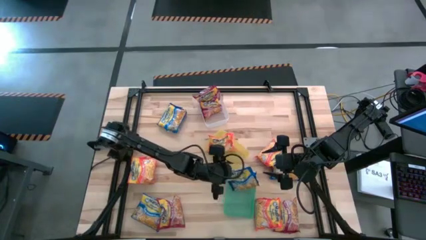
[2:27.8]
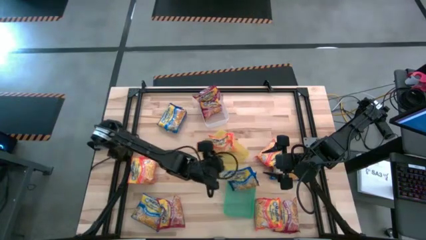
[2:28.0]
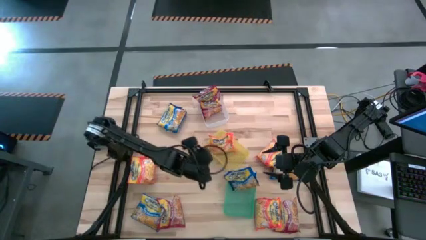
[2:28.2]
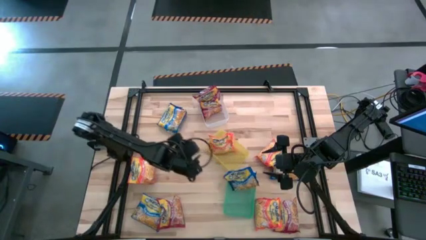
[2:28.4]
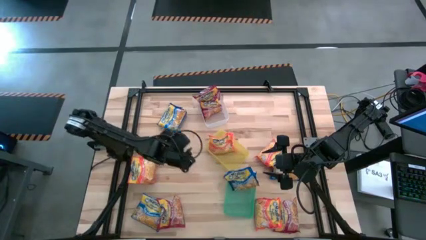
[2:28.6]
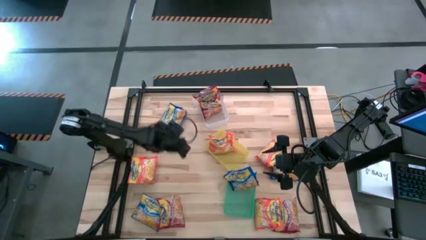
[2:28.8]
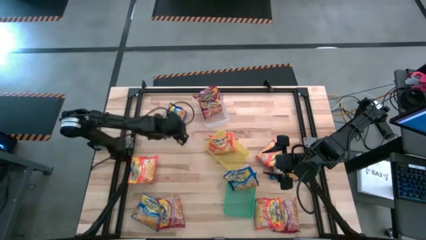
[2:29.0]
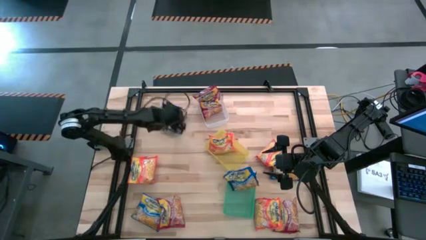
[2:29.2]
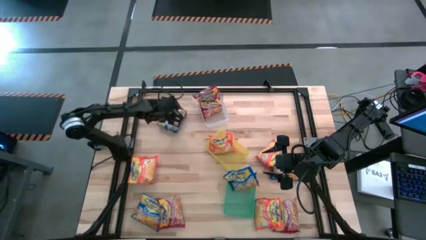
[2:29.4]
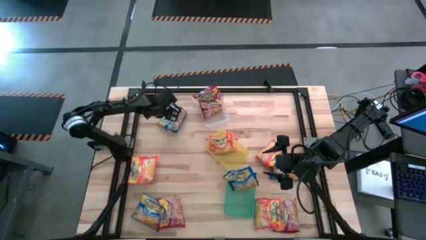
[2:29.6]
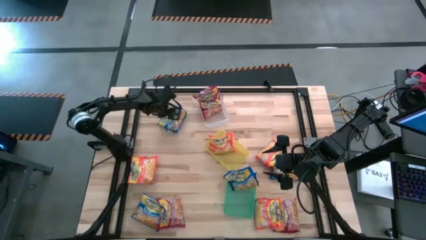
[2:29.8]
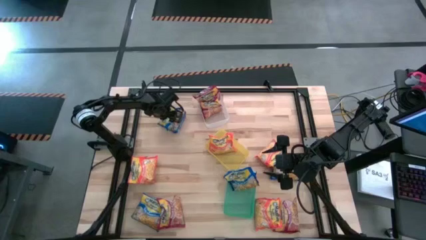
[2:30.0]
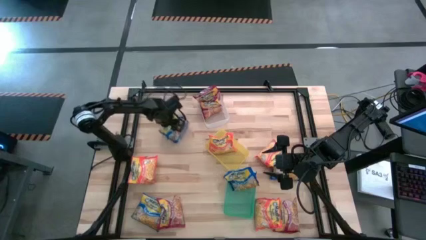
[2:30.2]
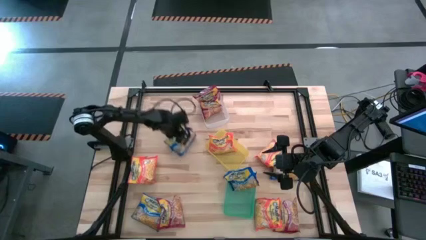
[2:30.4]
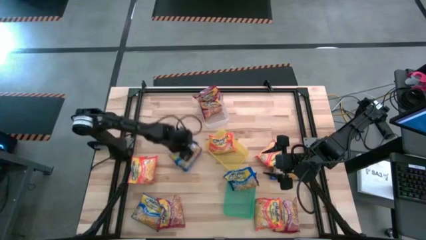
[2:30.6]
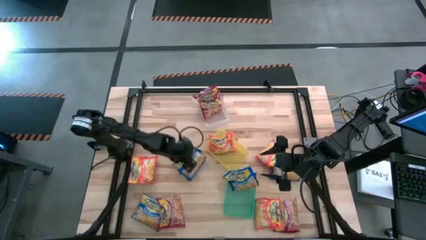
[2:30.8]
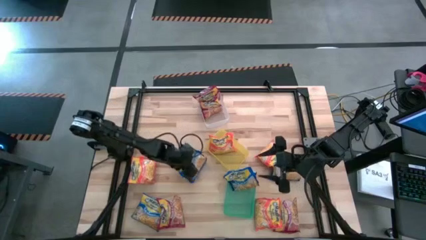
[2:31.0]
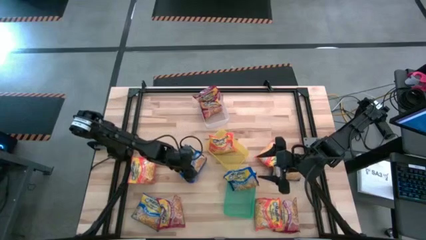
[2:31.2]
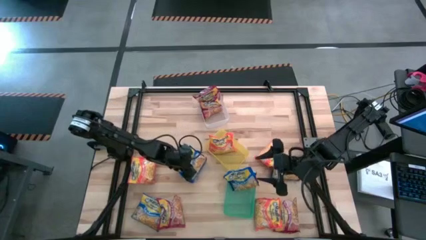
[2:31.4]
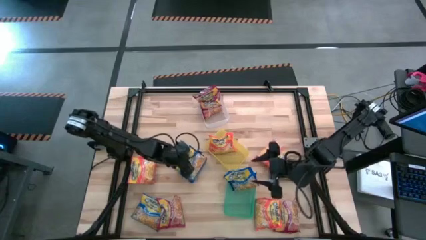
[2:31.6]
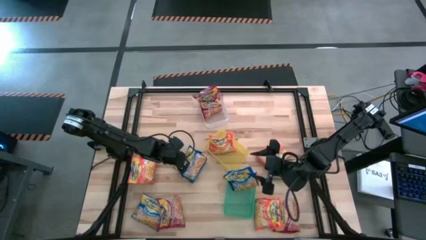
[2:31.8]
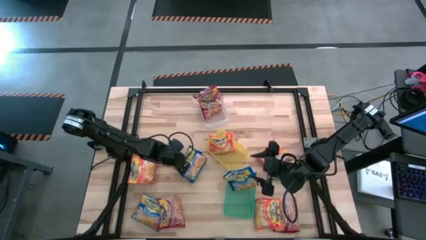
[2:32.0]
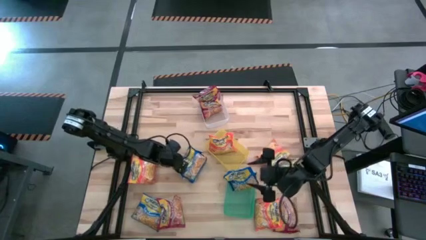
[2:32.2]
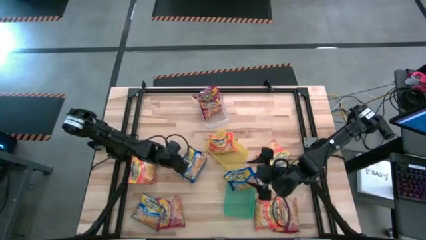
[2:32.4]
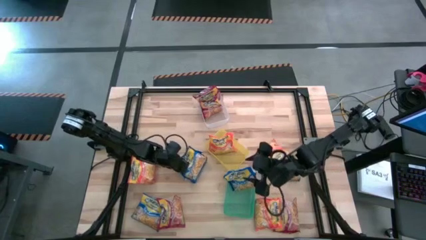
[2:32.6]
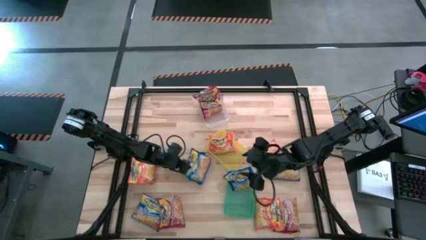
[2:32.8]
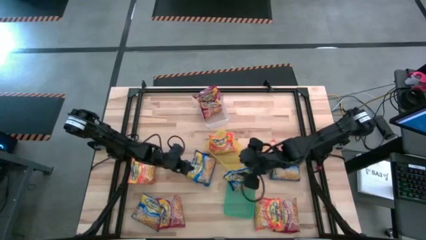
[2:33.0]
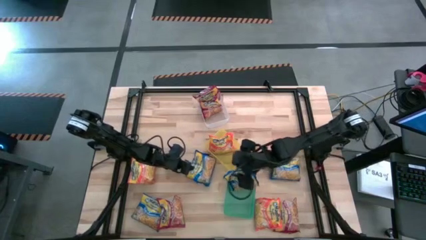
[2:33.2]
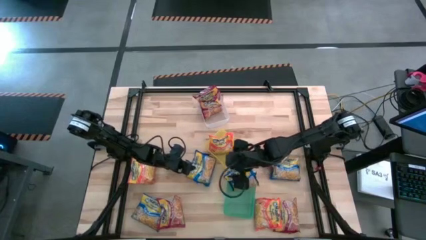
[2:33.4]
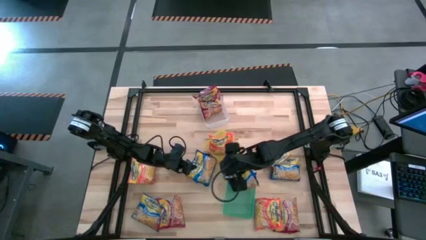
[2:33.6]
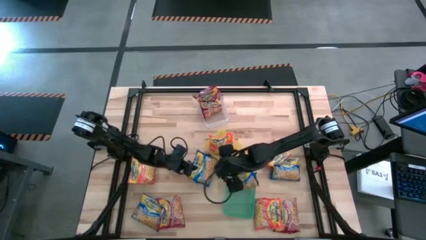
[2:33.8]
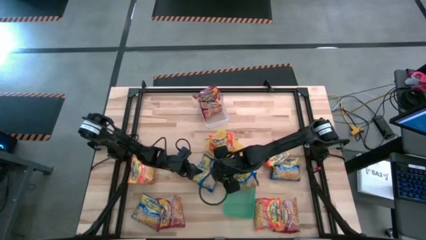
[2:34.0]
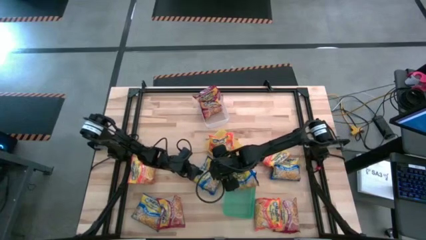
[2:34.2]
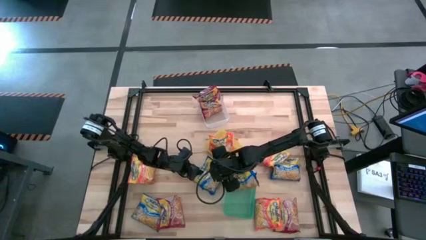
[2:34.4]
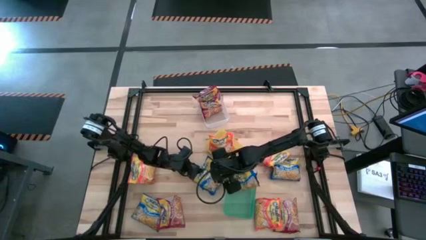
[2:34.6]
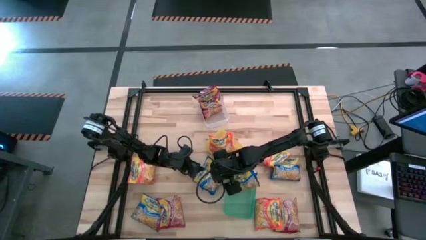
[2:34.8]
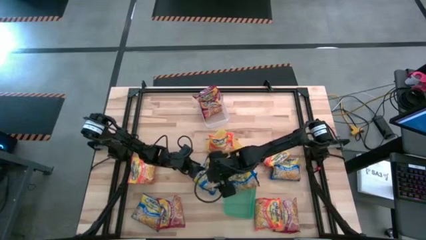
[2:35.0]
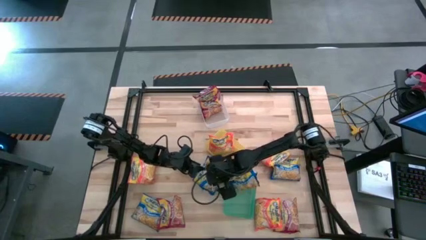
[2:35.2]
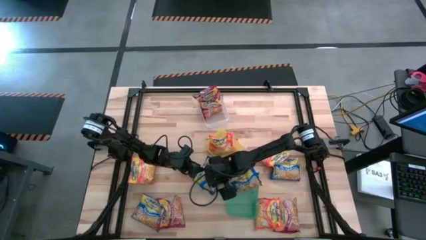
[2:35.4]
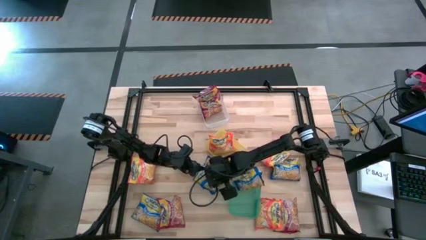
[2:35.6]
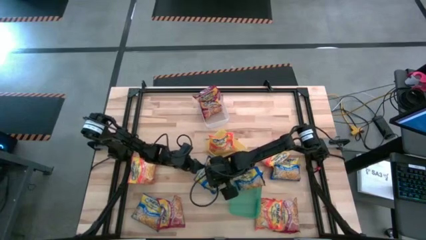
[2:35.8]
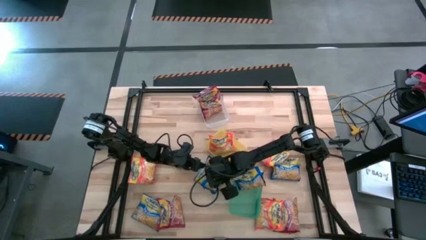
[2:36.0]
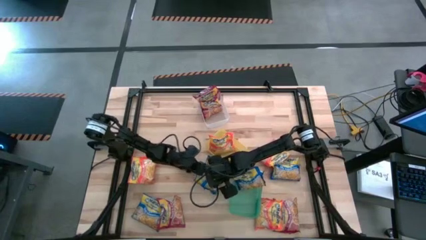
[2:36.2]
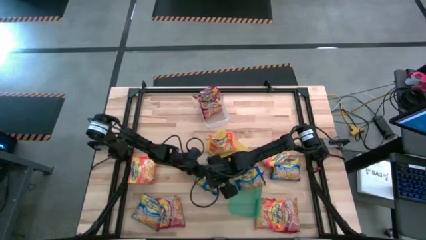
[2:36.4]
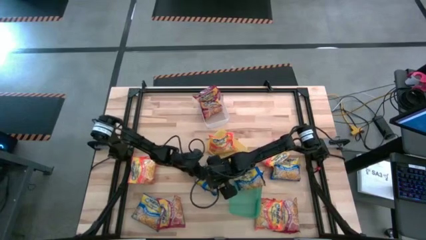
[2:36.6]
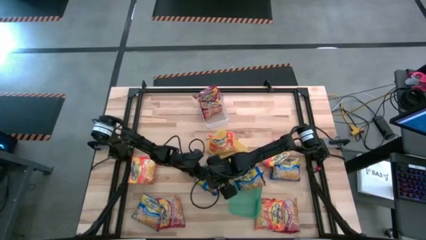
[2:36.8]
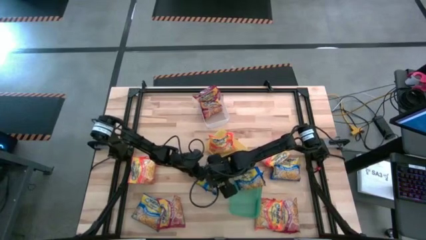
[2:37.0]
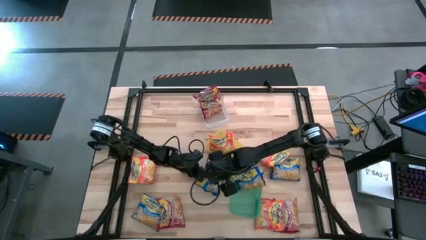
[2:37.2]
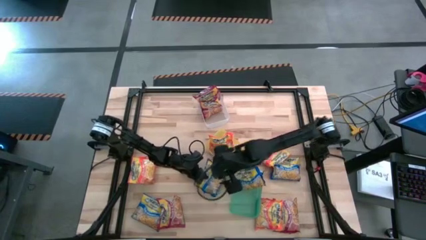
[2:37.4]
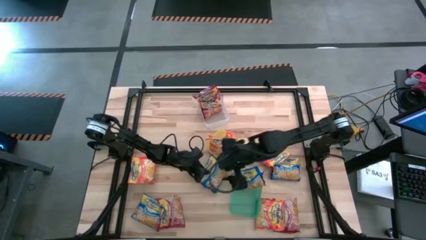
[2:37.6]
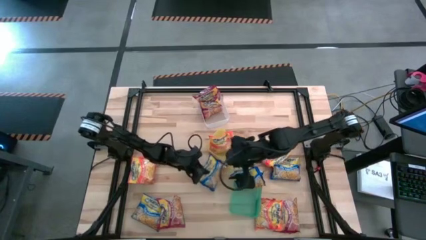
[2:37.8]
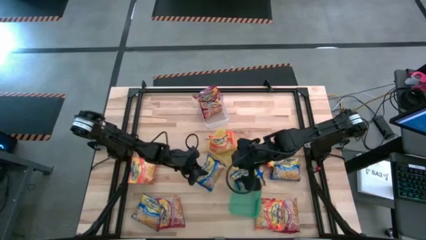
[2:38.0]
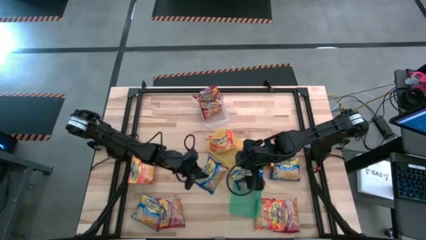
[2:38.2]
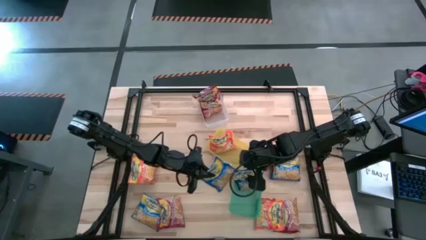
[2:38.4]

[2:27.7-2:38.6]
Task: Sort Maruchan noodles
Put the blue noodle pack into the green bin

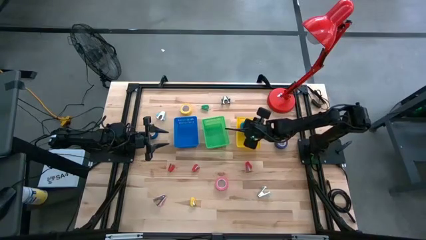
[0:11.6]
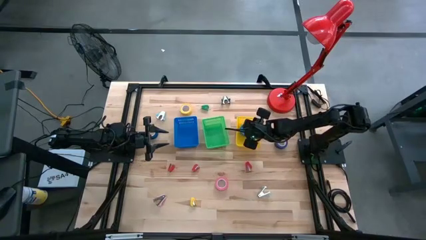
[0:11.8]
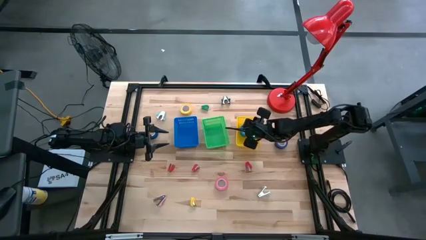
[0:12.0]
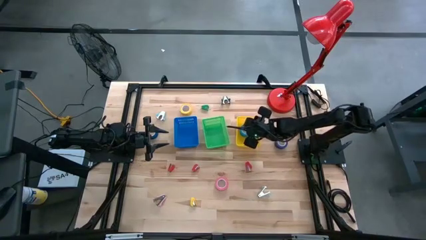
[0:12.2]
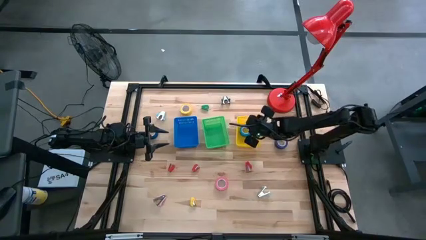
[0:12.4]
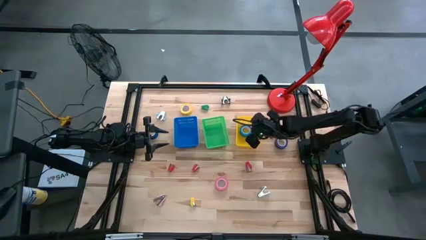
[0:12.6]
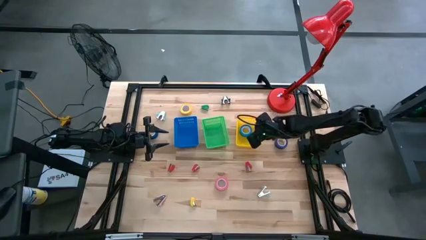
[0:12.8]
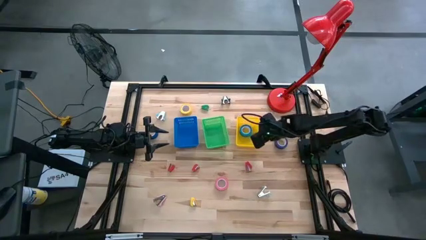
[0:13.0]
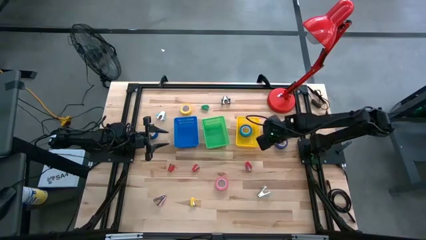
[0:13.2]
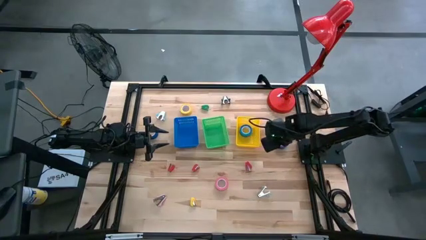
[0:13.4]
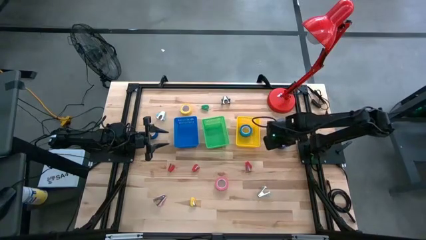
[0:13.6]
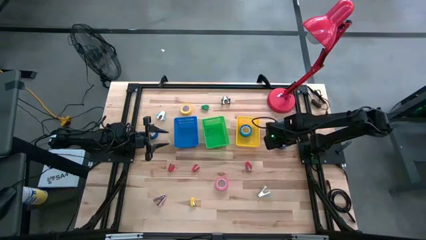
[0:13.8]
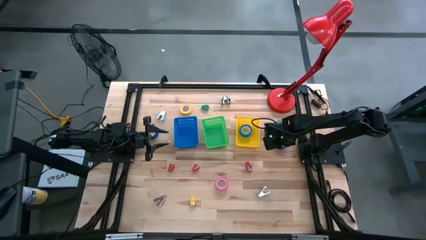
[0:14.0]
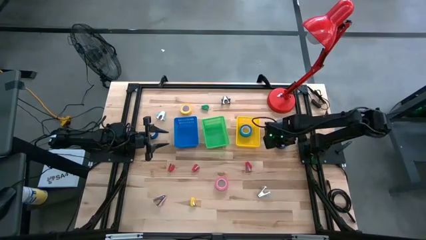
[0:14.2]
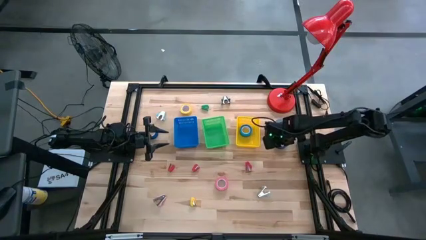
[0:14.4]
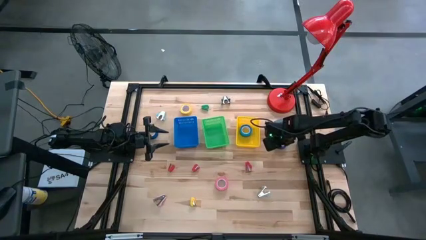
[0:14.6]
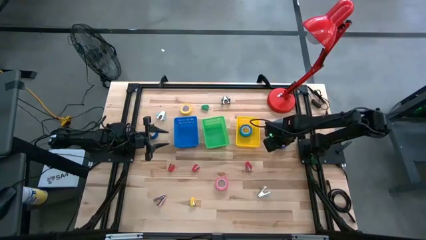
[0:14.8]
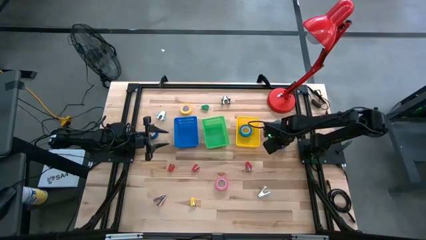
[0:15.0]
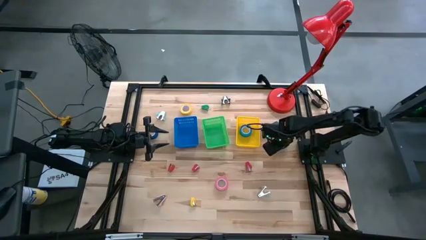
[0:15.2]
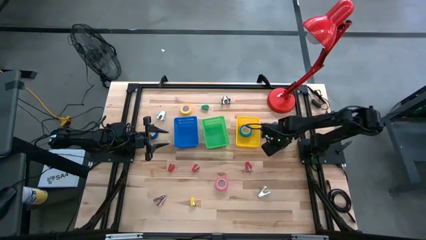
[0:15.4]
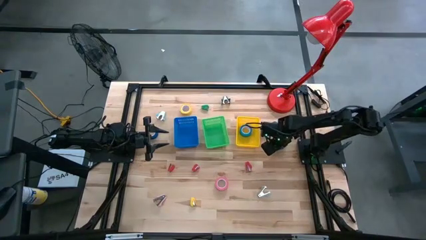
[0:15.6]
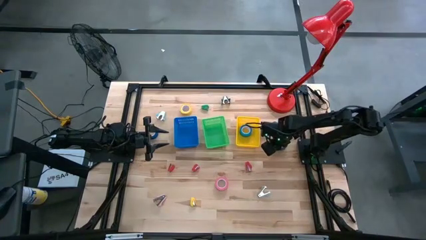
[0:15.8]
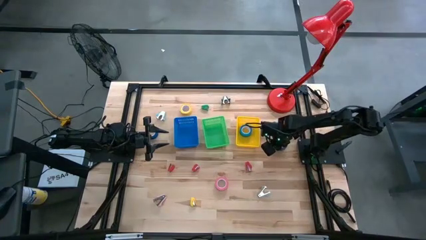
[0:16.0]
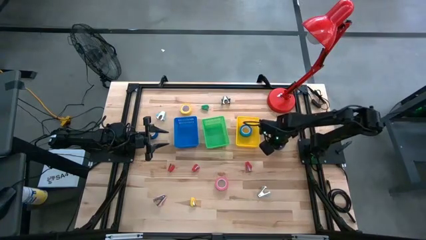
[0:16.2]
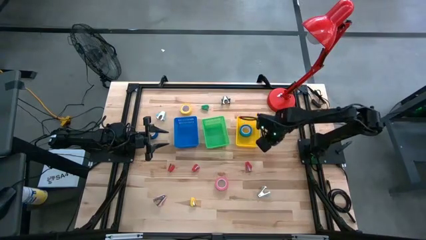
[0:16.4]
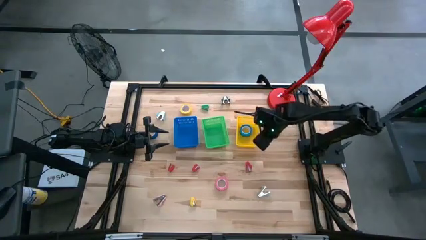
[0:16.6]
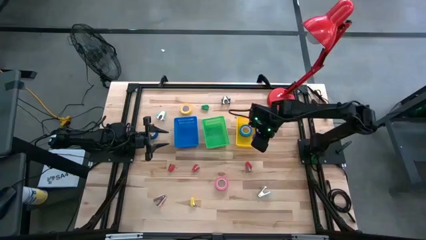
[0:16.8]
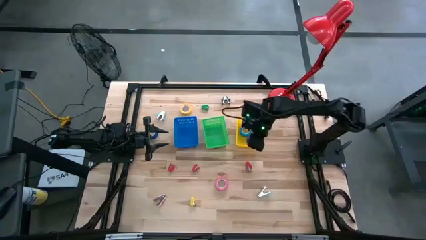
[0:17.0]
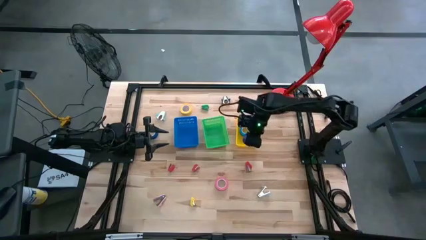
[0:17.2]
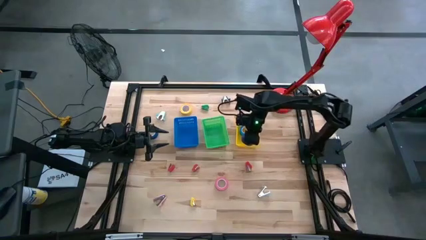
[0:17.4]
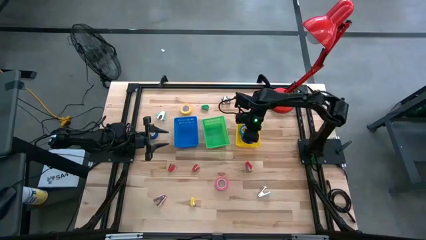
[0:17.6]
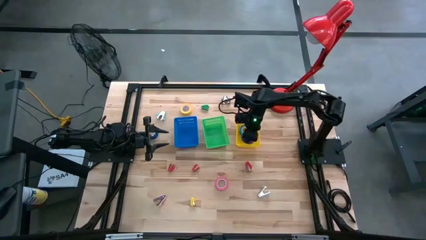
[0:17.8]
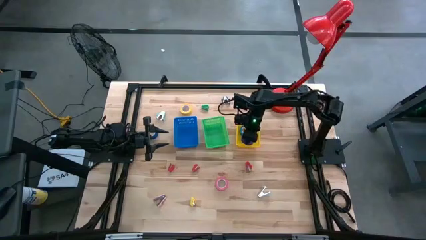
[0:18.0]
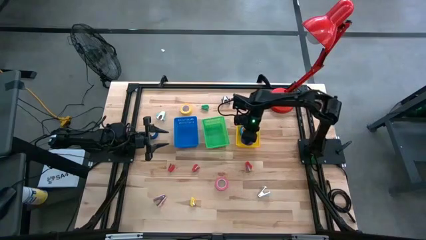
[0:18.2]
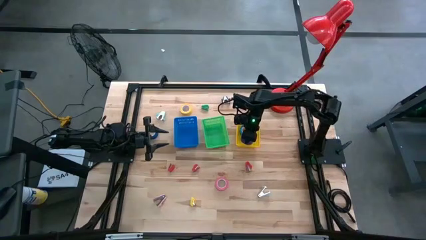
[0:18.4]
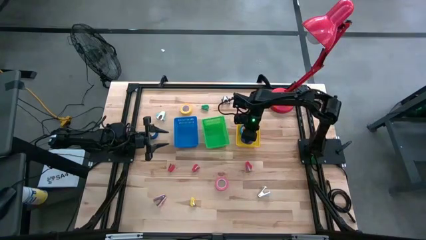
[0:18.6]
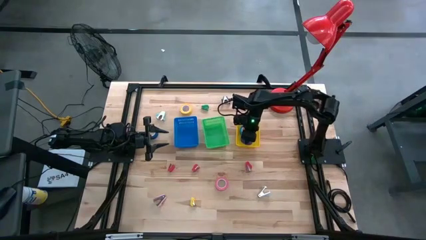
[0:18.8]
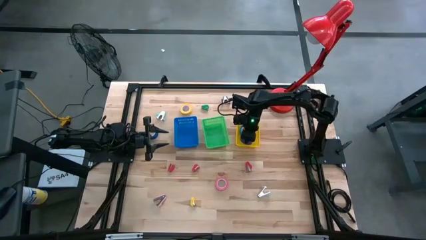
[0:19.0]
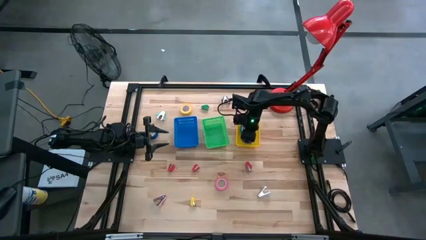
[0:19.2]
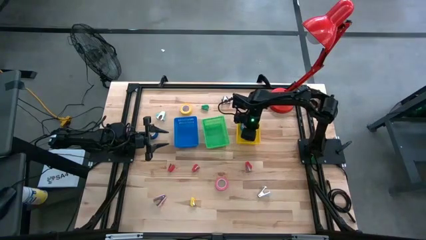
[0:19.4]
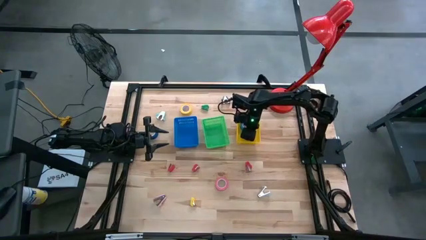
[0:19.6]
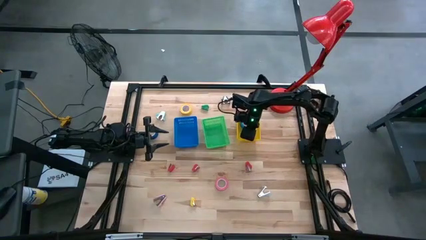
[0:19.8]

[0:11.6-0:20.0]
Task: Pick and place Stapler, Stapler remover, tape
Put the purple tape into the yellow bin
